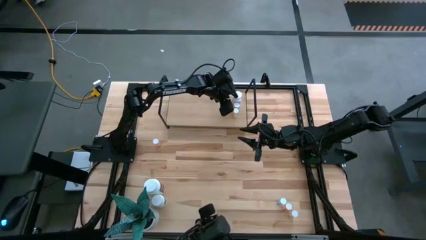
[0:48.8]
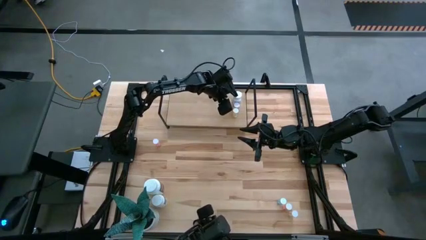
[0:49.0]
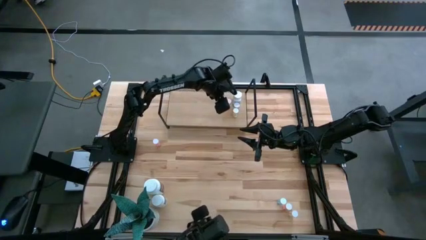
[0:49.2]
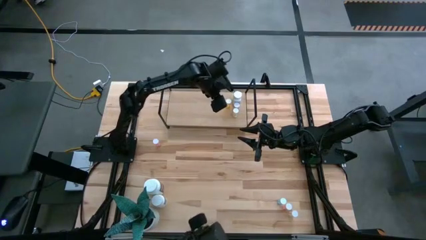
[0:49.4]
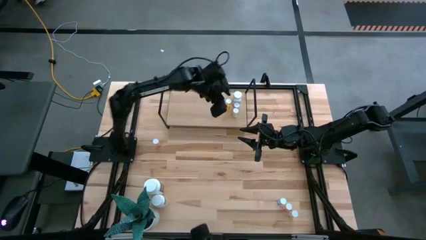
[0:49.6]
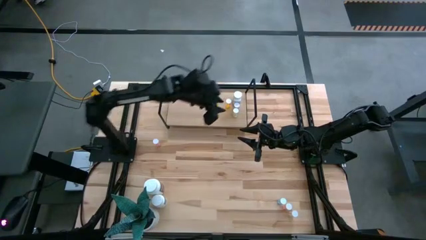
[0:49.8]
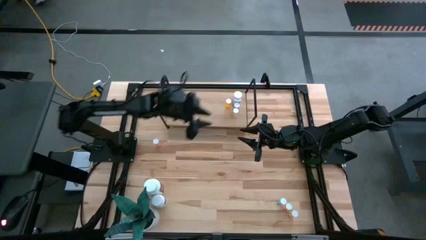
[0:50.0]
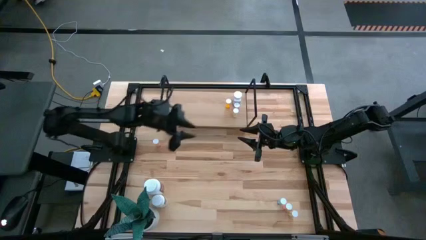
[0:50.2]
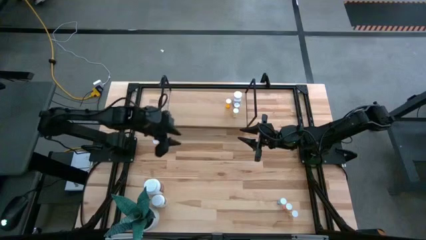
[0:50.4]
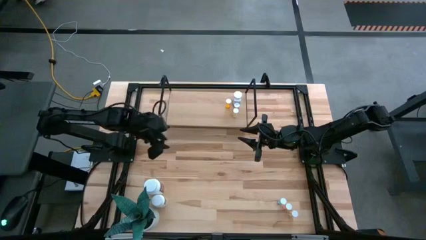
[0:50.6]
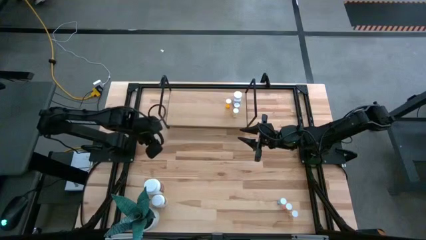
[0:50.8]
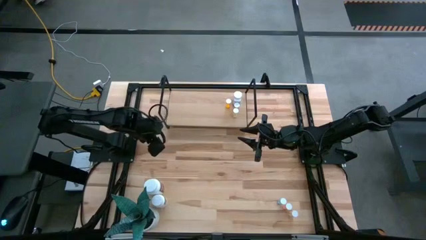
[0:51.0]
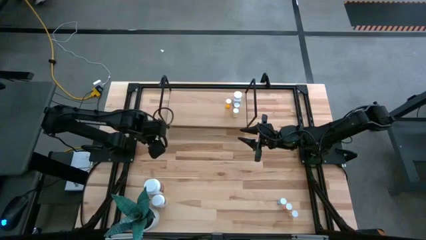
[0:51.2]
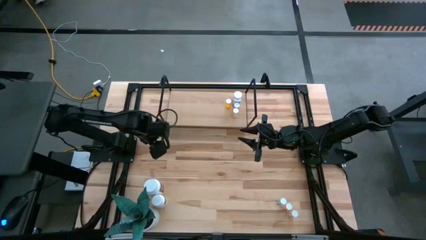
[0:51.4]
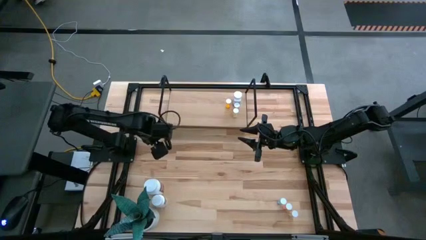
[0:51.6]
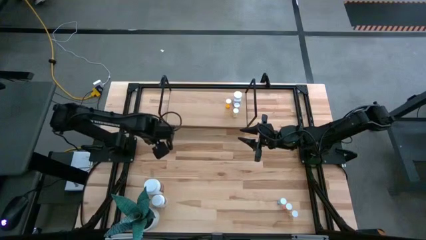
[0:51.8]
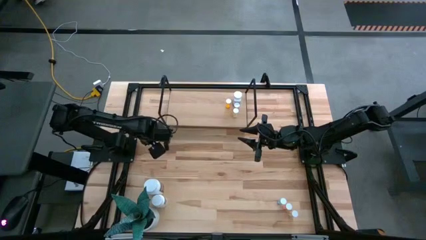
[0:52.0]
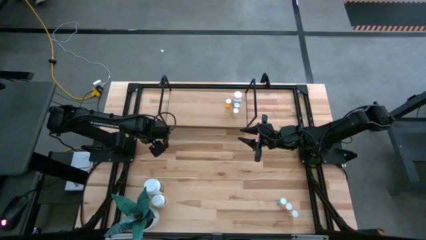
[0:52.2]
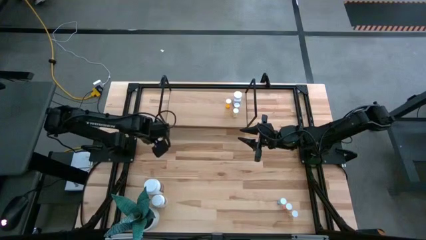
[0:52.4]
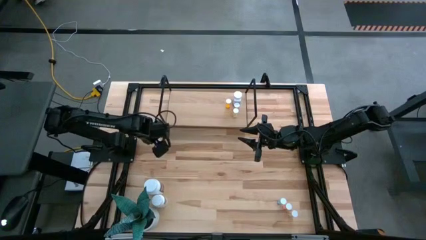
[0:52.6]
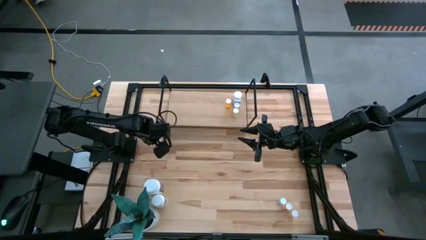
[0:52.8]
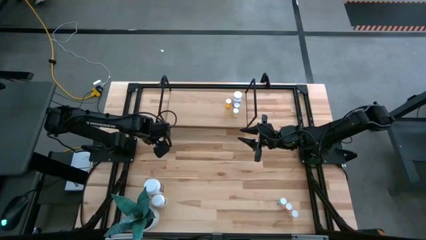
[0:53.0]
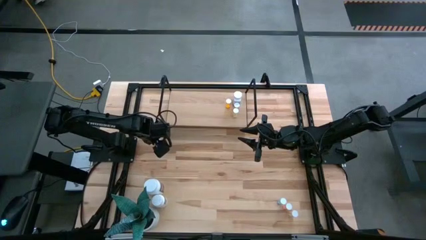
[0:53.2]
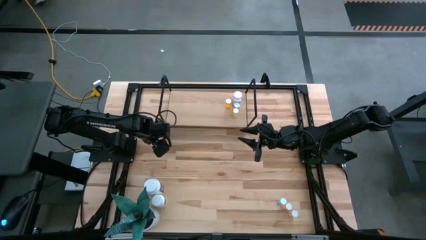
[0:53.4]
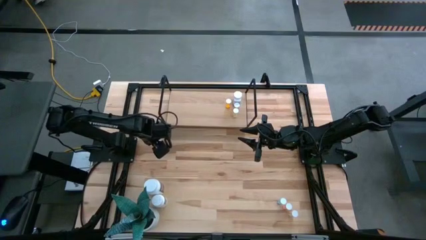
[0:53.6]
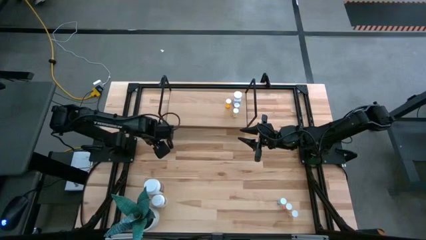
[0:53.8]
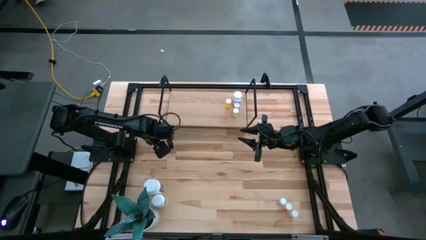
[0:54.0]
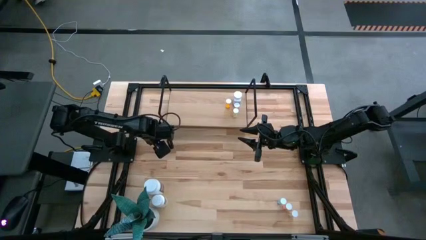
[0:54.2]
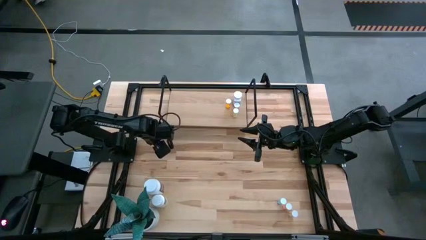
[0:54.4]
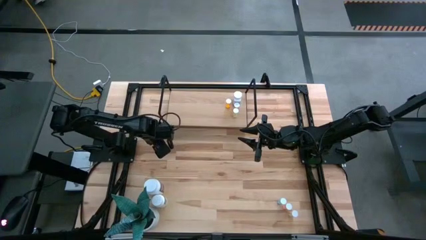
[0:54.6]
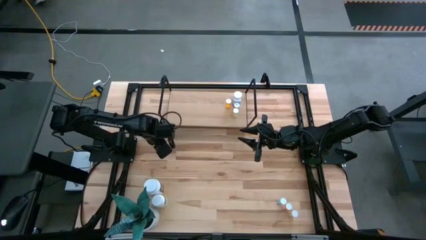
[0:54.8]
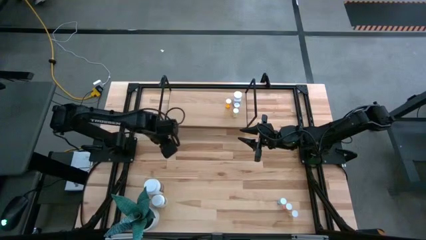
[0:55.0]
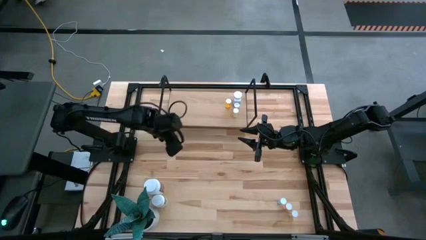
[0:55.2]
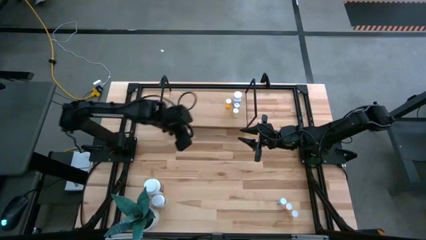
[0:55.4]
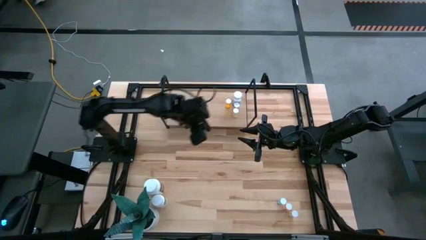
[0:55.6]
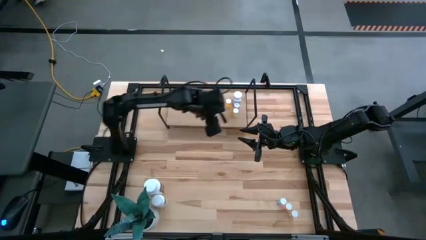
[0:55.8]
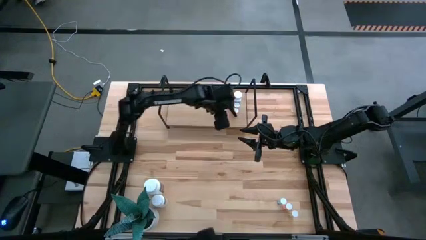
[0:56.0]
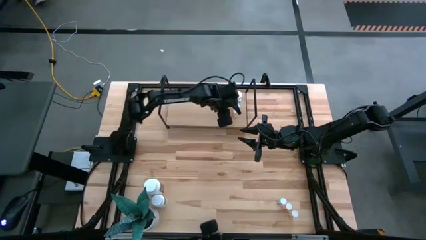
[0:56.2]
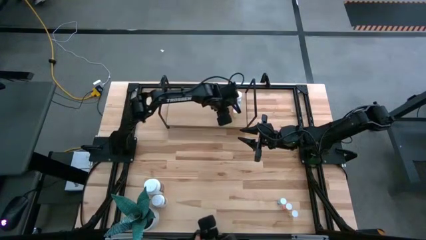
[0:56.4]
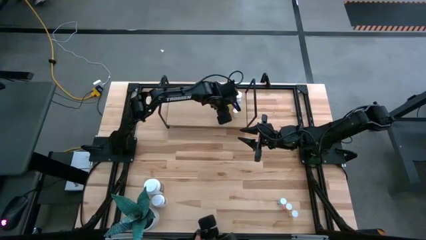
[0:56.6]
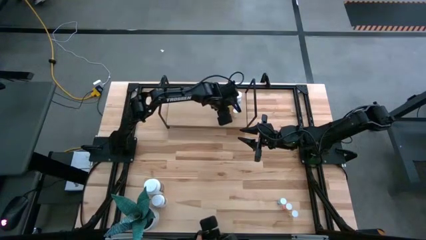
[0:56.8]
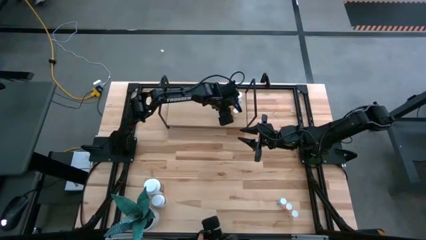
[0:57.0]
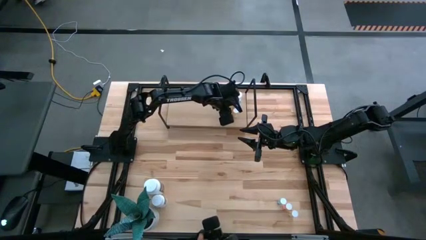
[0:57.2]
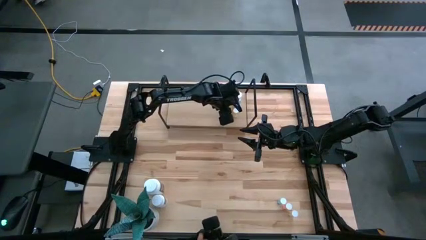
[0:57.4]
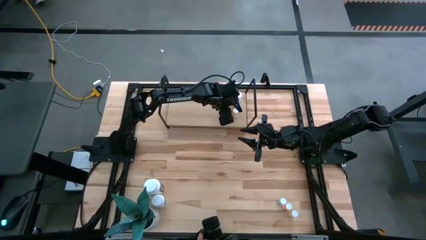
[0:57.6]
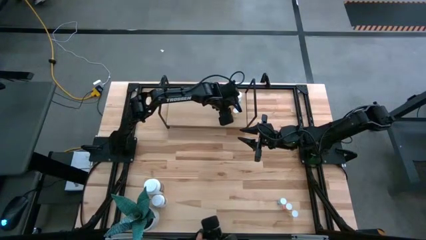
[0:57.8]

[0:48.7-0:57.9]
Task: Pick and place medicine bottles onto shelf by color
Put the top pink pill bottle on the shelf

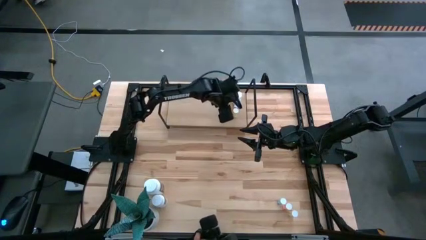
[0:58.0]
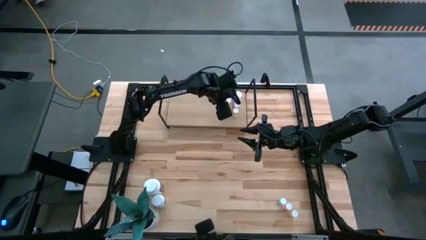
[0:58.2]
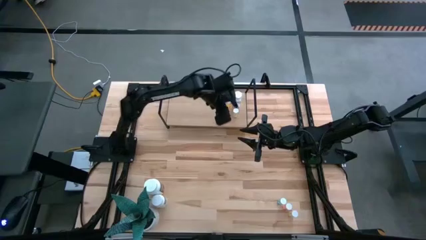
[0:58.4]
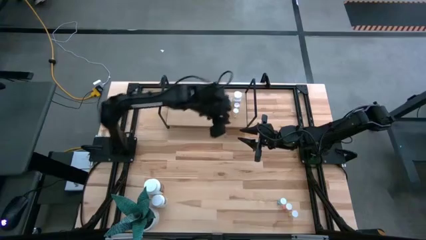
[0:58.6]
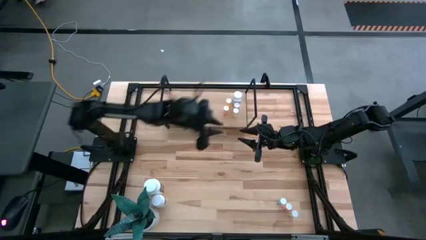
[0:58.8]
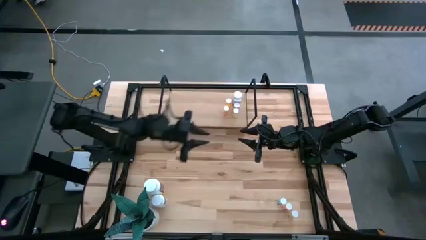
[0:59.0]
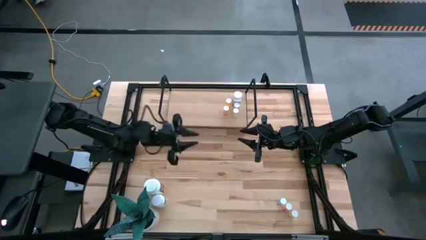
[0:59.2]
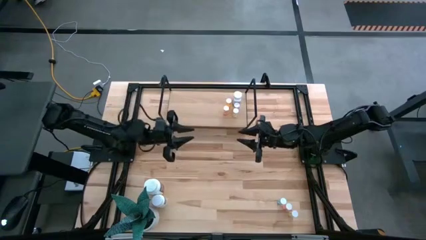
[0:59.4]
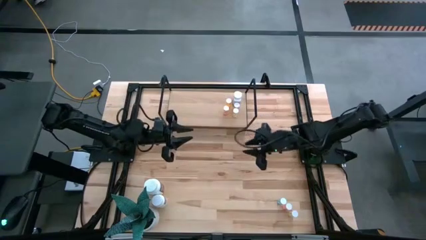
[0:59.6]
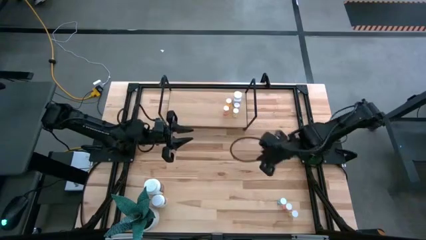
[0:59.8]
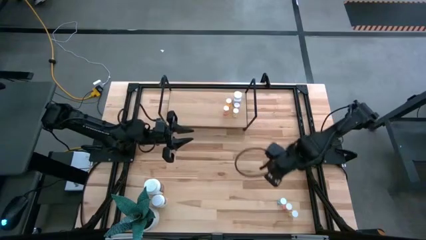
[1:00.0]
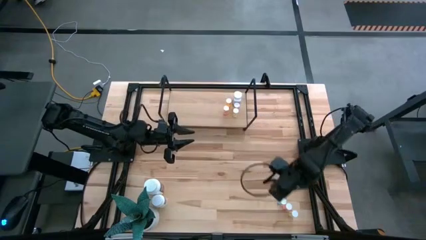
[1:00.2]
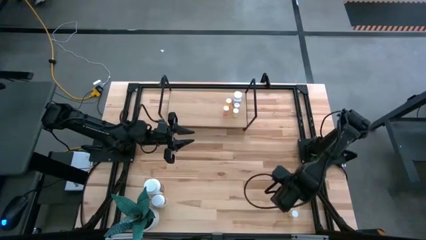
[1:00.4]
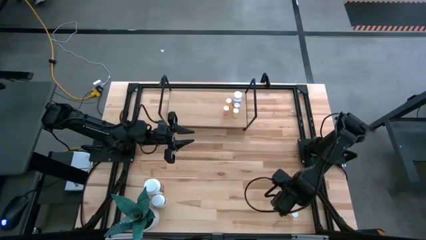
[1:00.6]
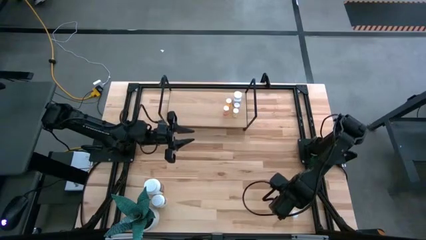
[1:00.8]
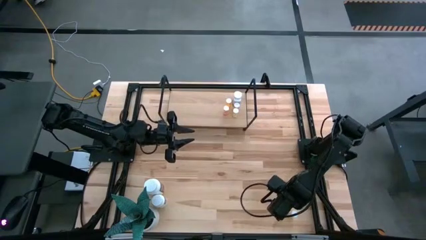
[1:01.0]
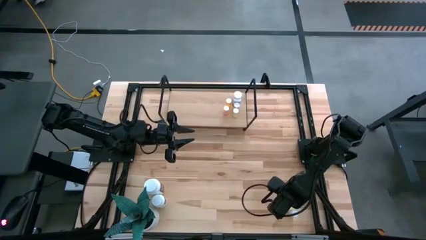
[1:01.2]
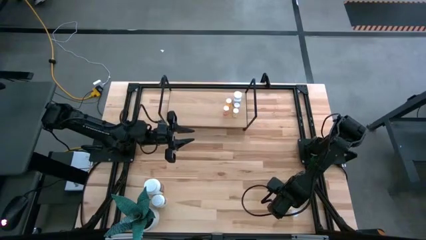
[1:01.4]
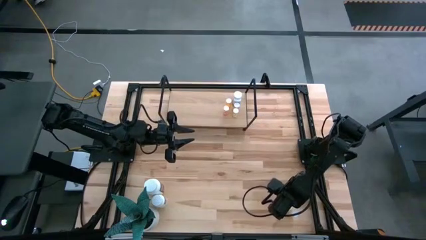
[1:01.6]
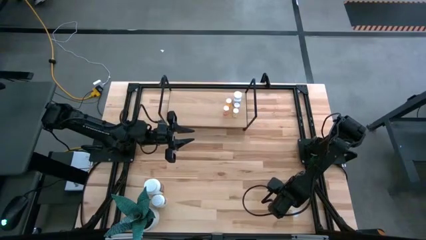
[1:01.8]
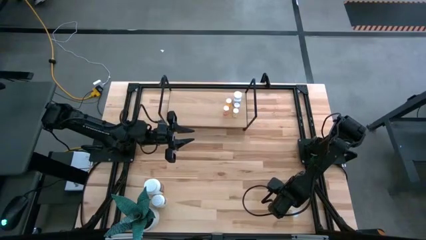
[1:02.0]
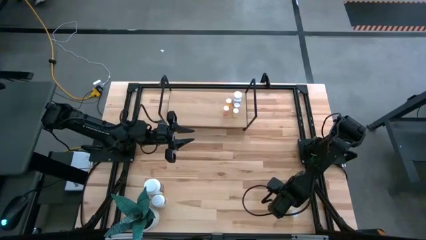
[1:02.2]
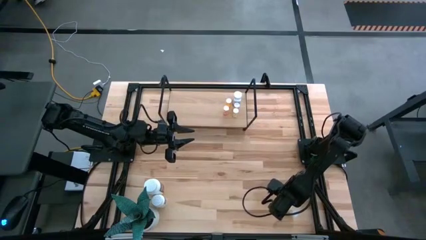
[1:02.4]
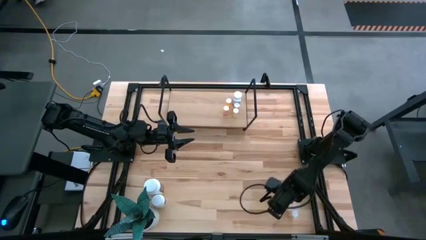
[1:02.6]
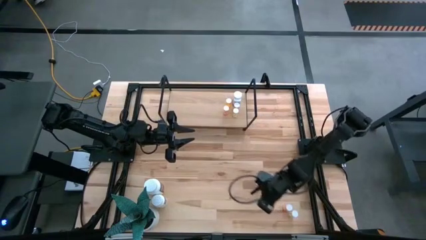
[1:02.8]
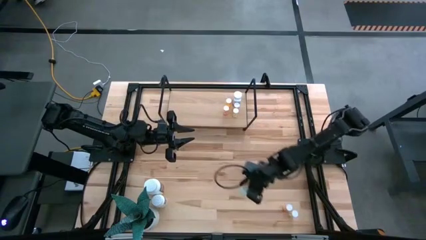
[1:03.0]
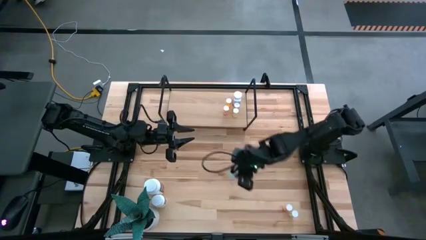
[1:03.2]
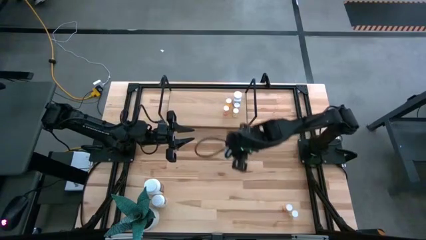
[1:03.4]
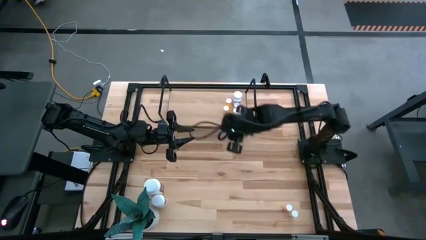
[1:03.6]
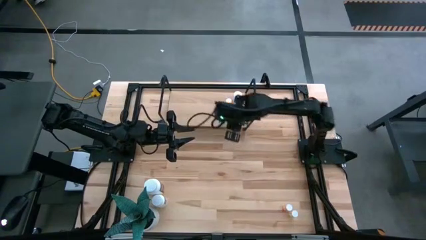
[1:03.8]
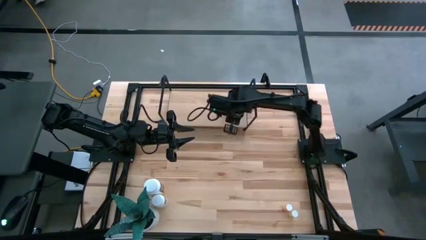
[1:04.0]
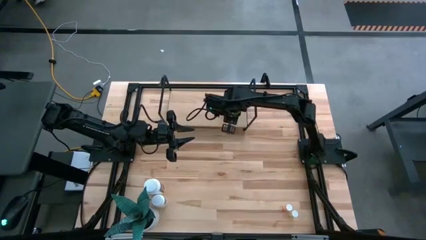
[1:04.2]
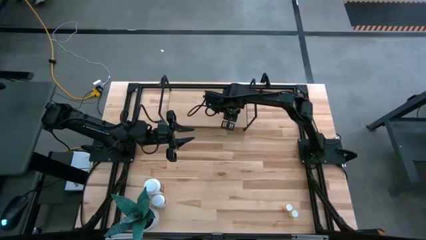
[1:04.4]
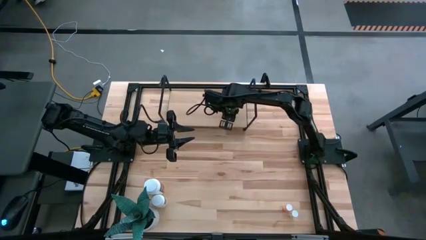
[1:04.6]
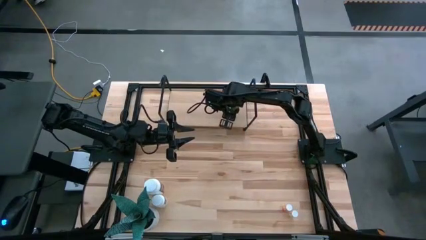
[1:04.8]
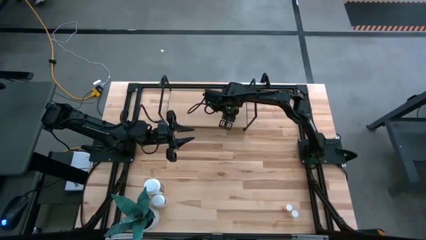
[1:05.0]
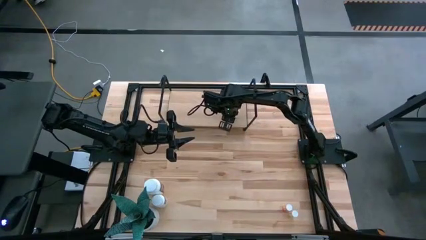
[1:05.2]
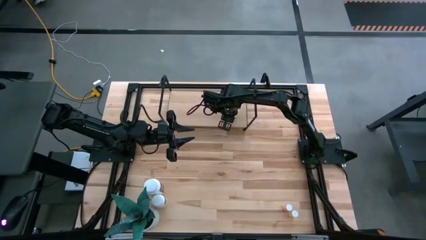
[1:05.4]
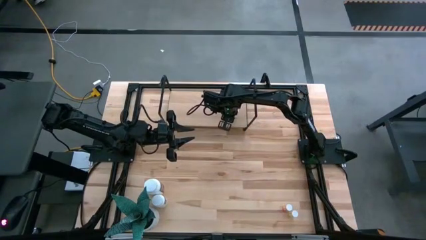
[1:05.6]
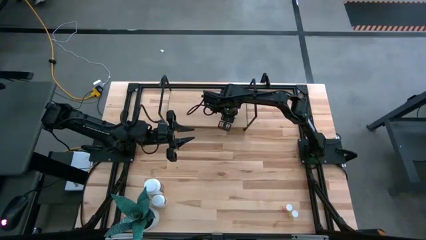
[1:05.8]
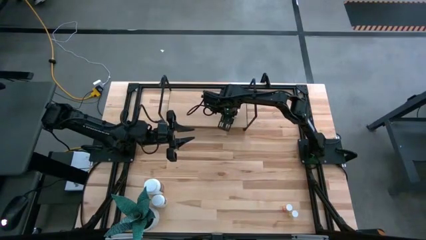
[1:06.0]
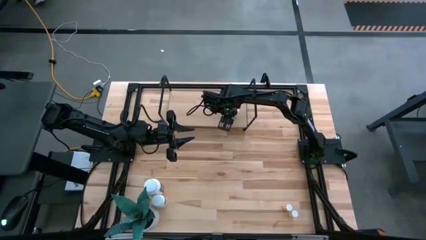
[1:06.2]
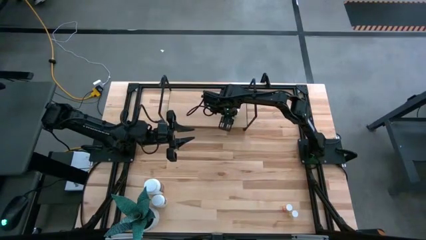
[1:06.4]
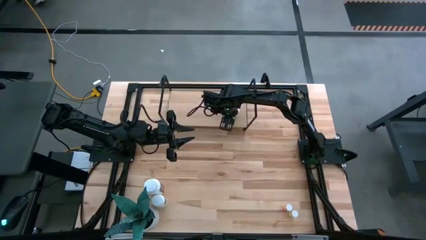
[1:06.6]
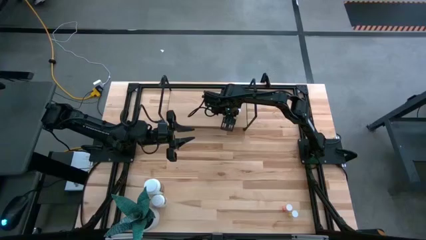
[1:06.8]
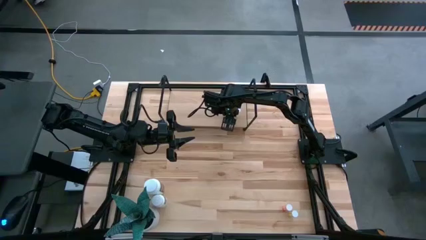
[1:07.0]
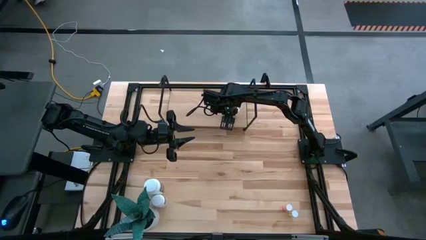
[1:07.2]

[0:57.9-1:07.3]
Put the blue pill bottle on the shelf
